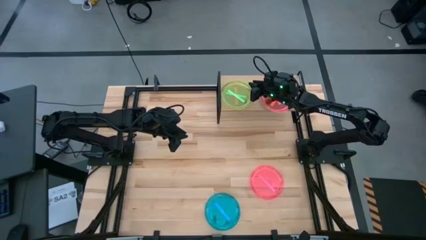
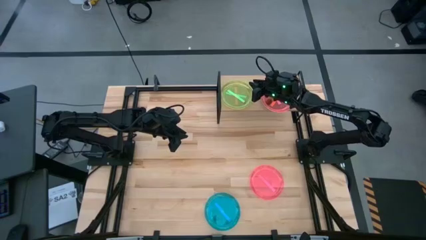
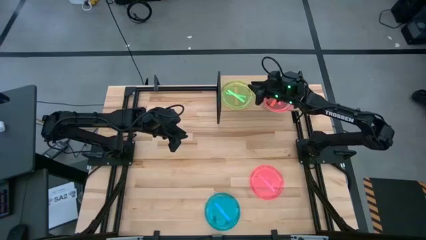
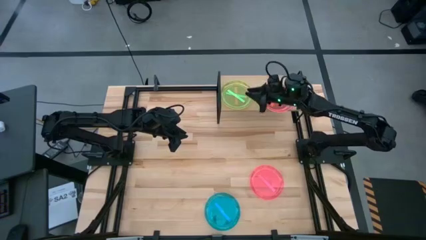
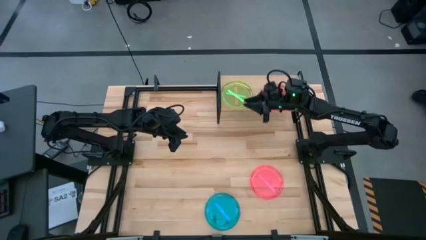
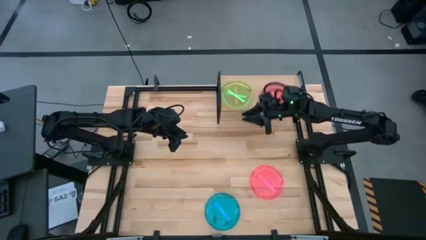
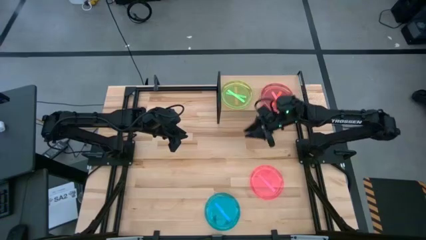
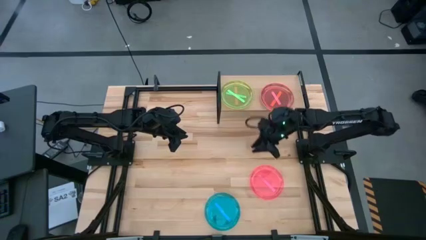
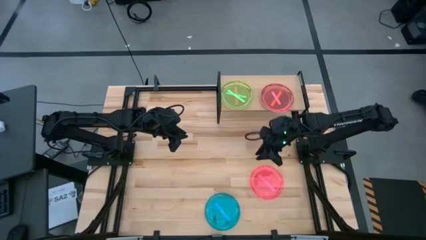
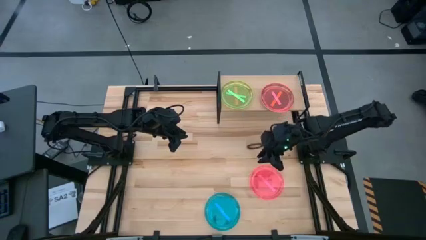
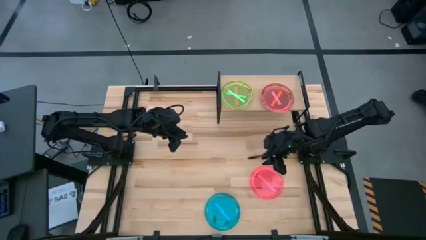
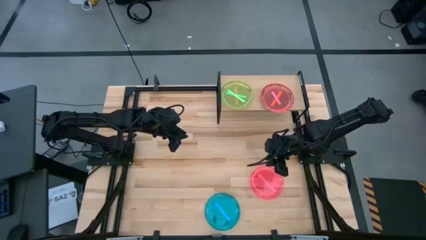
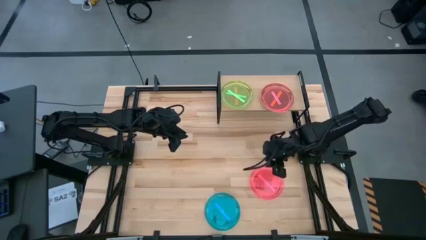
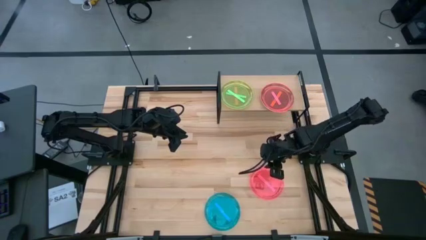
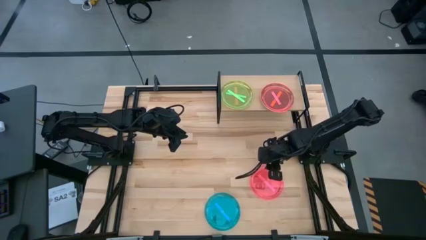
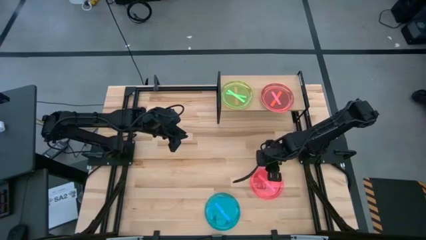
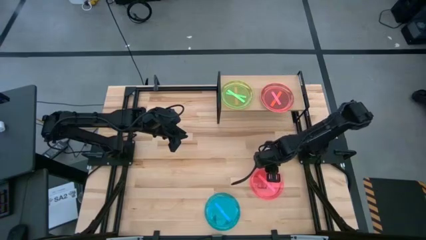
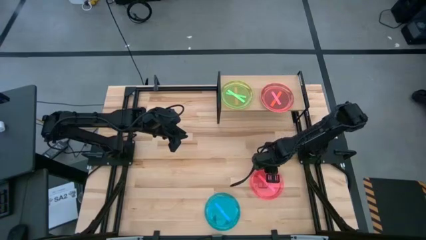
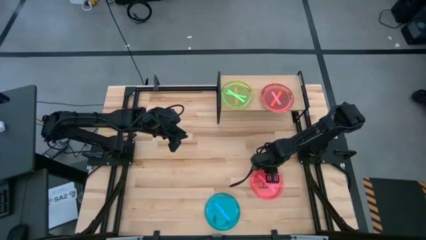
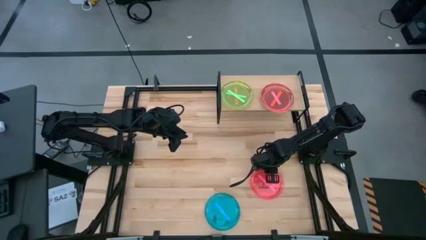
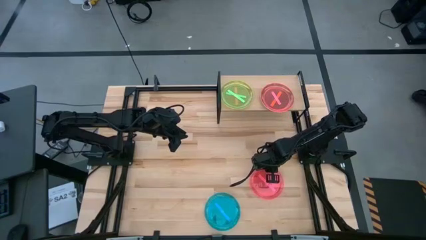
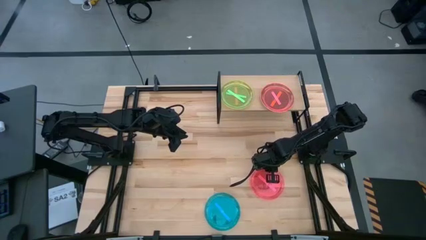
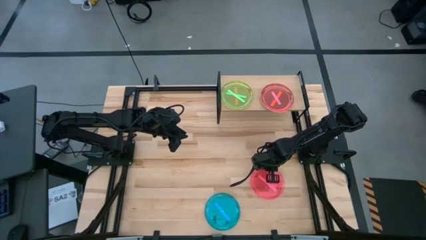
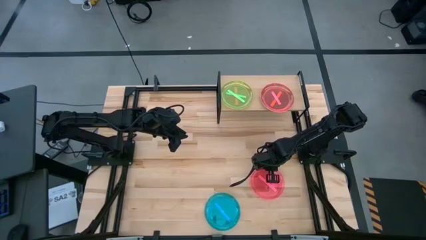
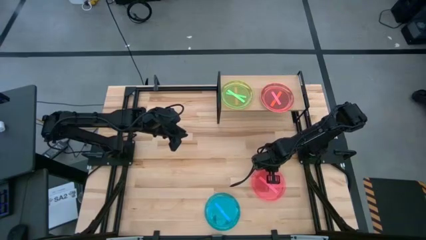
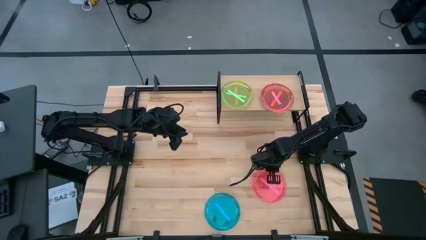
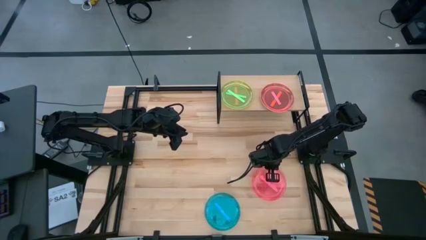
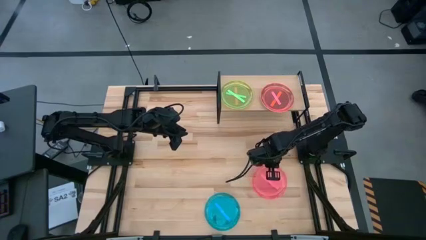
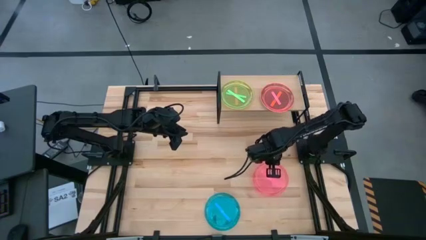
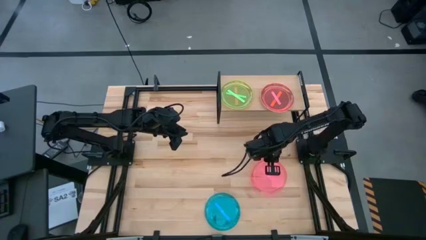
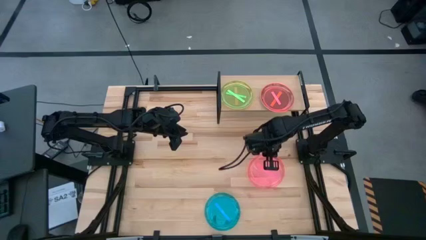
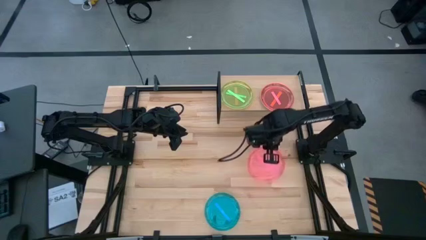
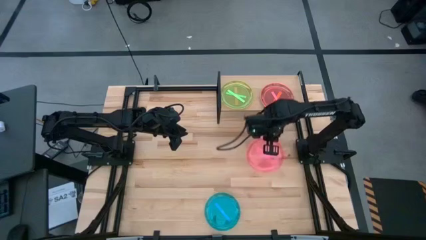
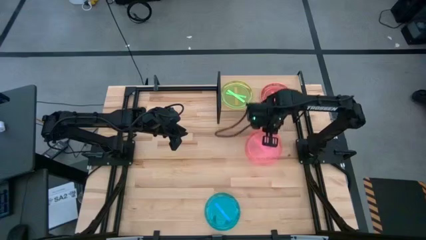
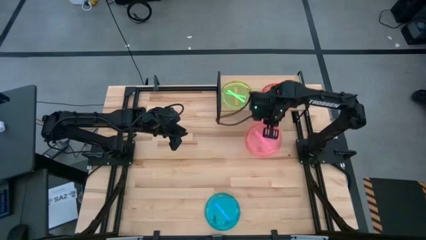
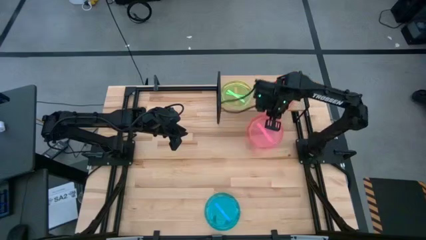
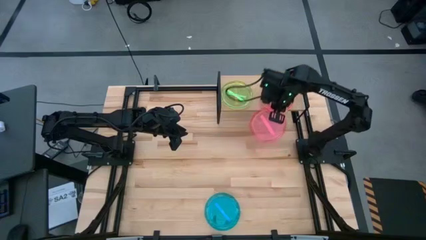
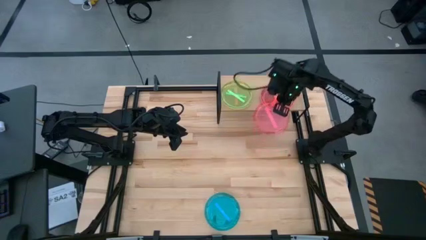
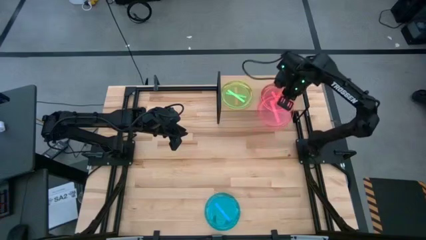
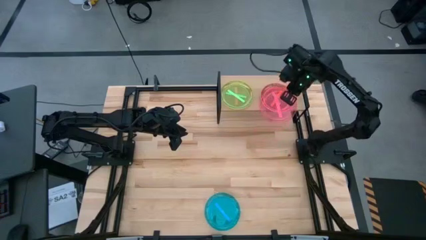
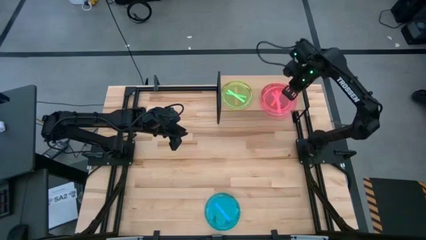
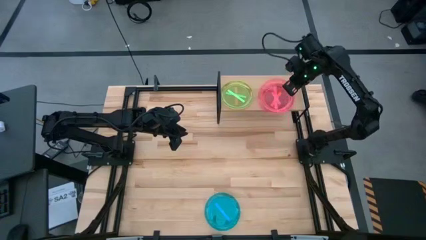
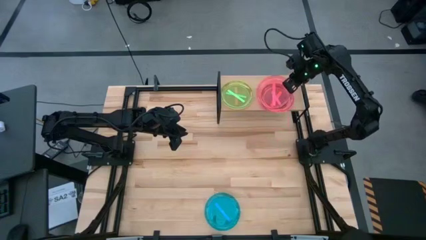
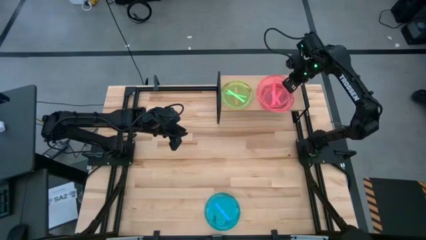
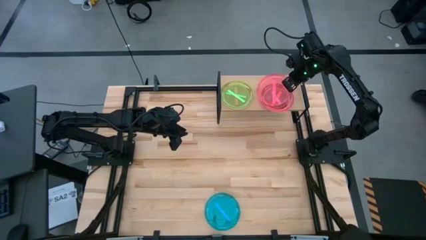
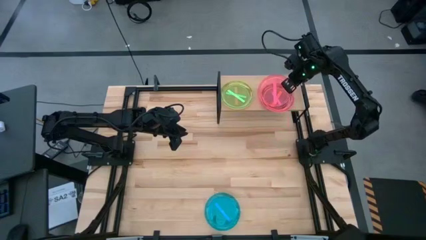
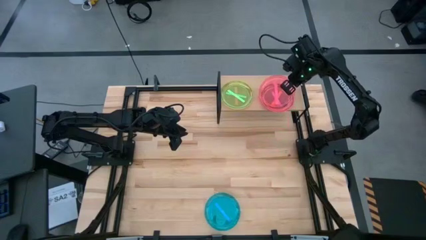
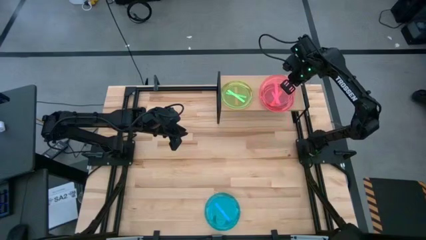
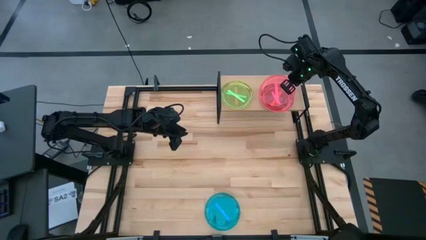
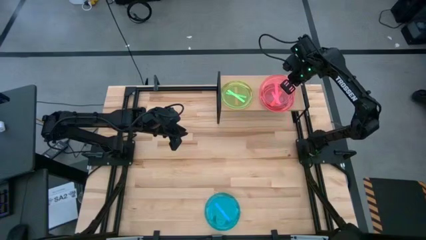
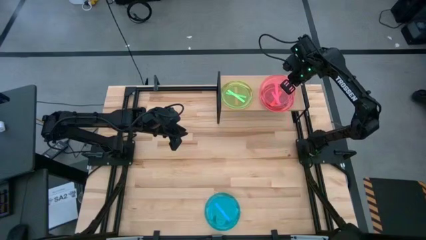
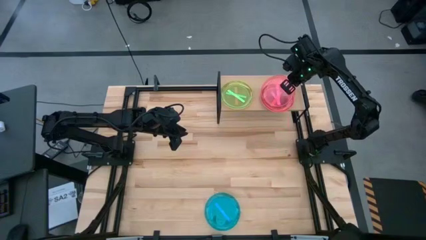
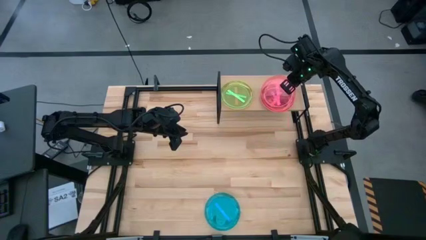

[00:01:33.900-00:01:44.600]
Task: Place and stack plates onto a shelf
Stack the pink plate on top of the pink plate on the shelf

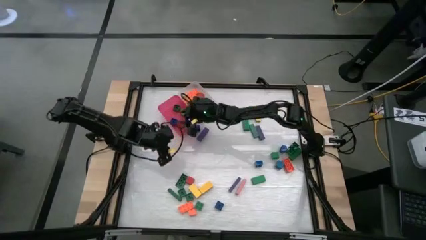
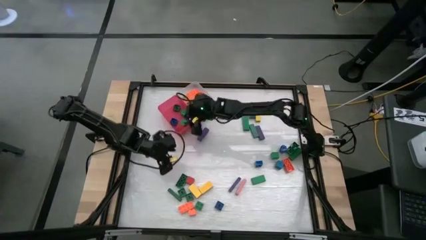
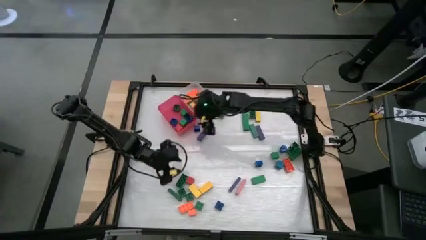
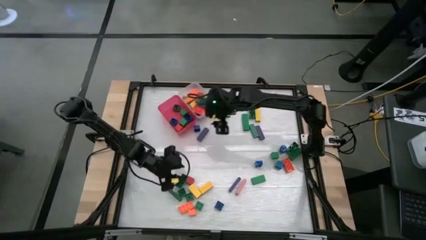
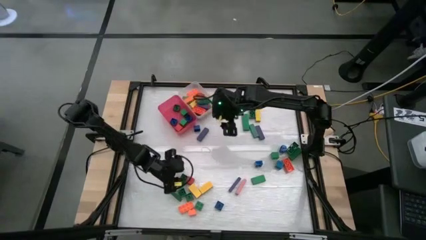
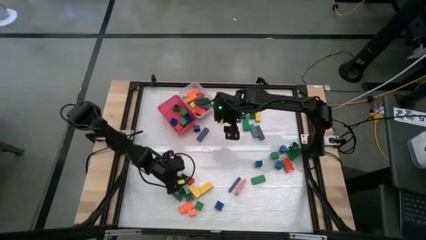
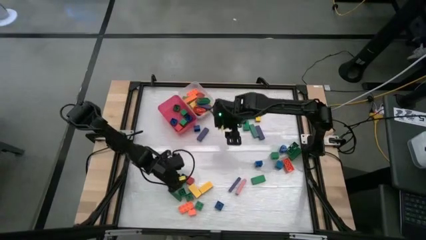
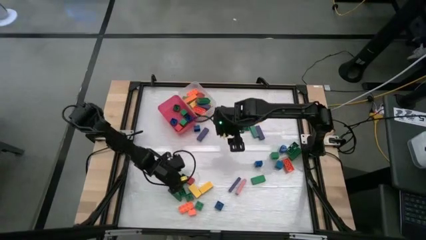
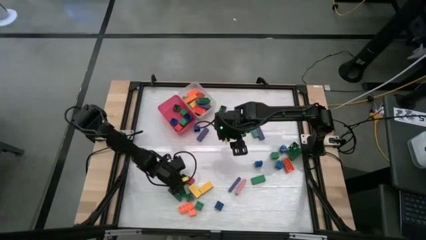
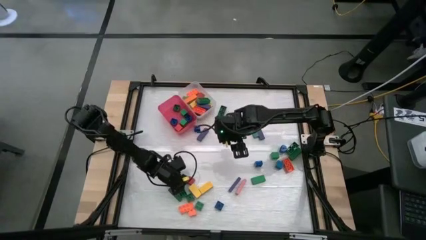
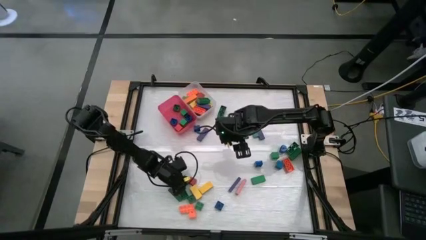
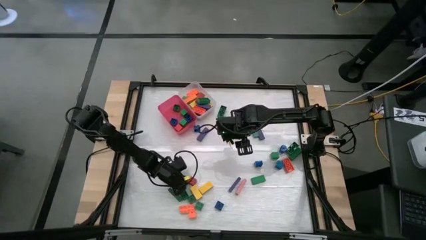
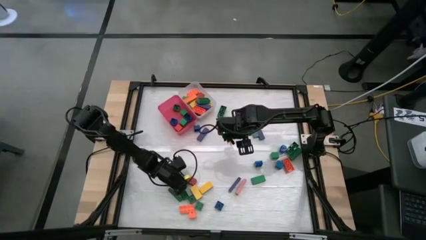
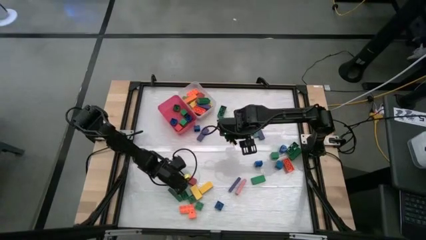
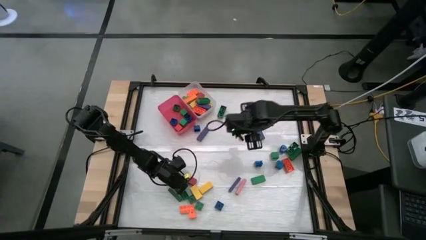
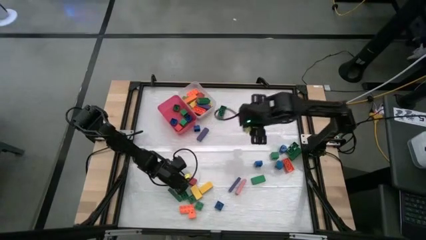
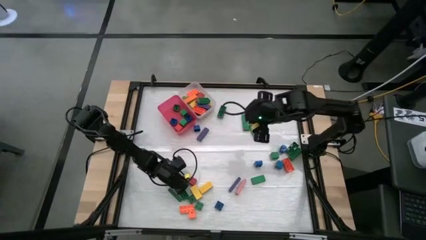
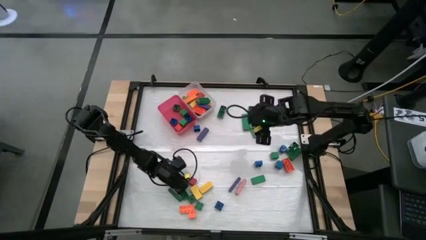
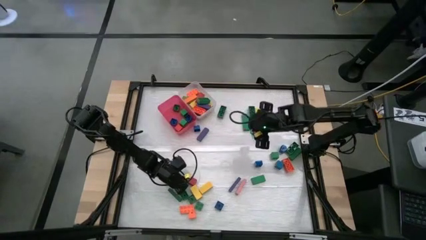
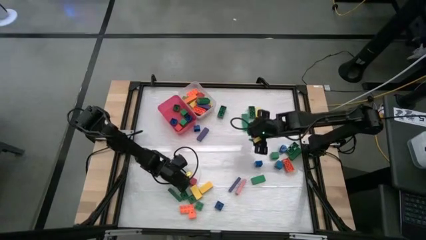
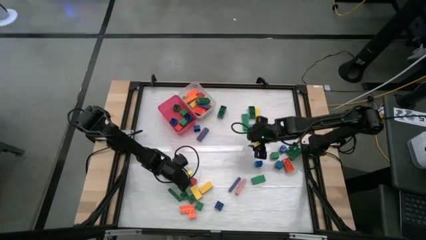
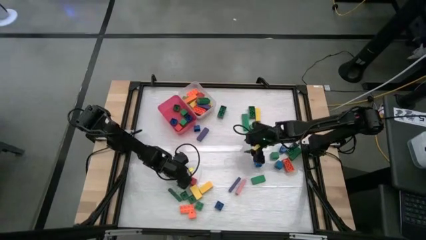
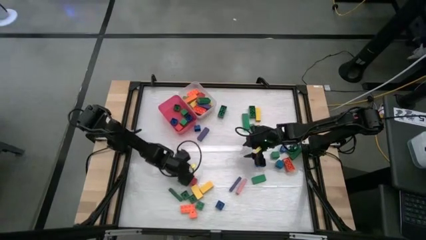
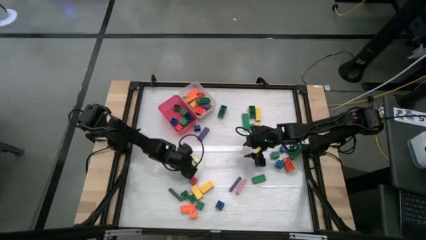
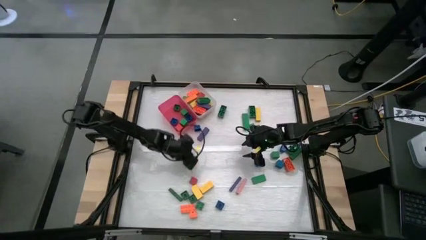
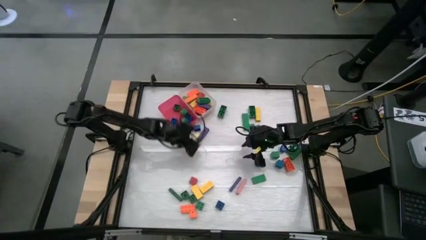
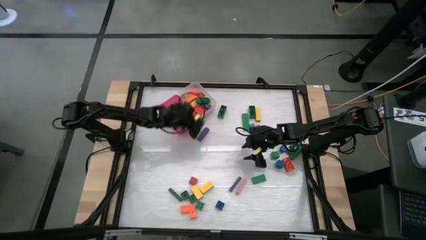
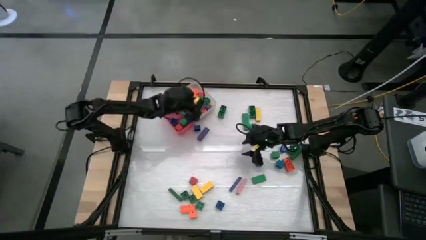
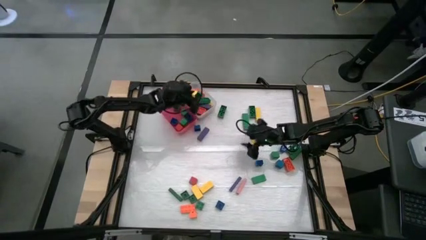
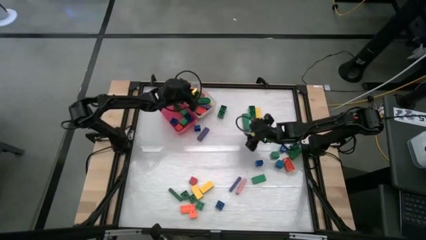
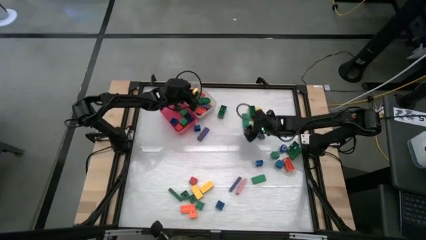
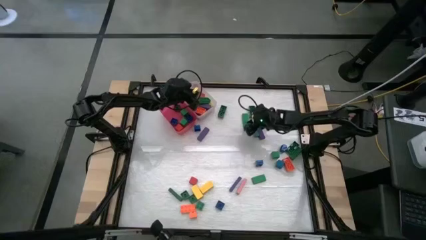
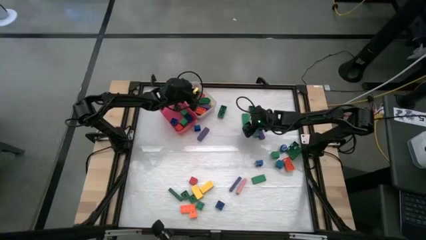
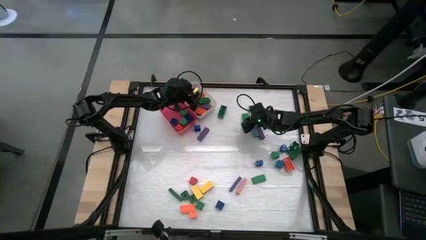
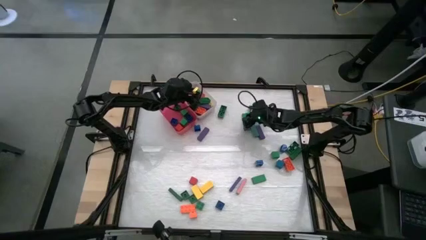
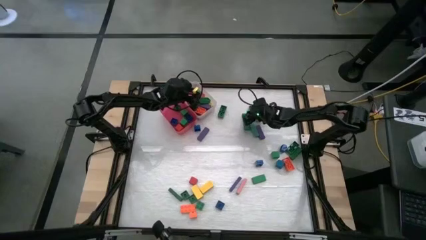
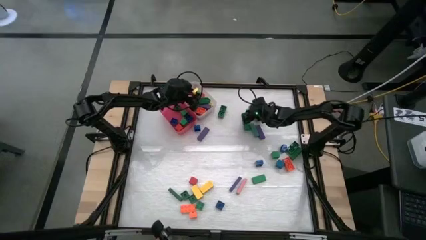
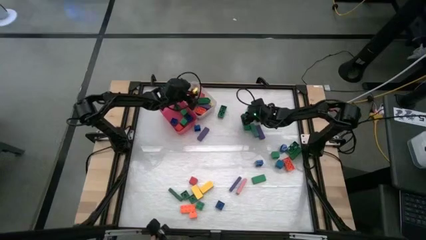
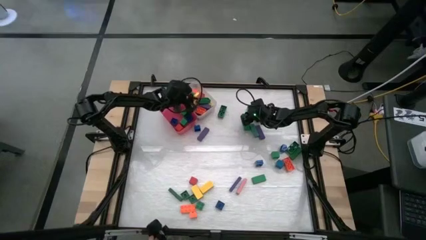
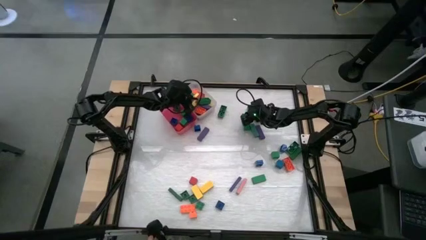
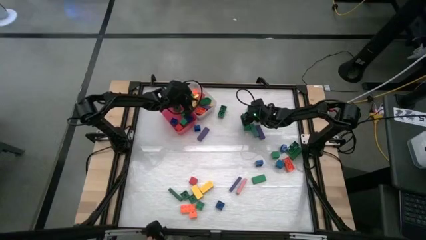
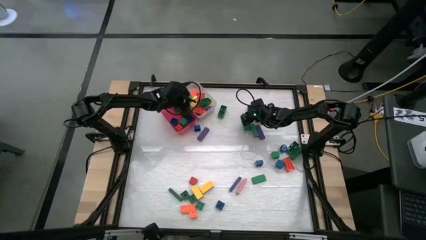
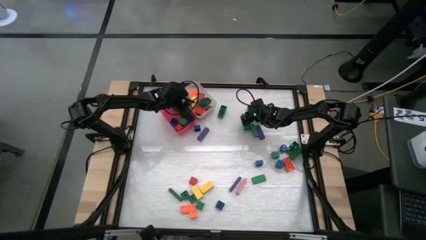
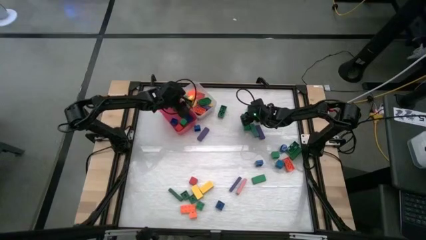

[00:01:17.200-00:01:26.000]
Task: Sort blocks by size
Put the big green game piece into the white bin
